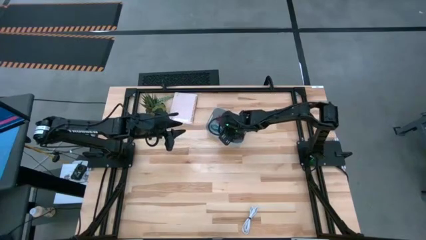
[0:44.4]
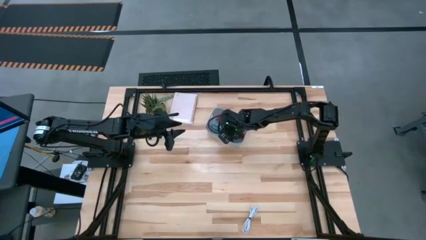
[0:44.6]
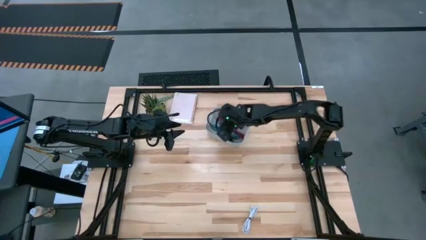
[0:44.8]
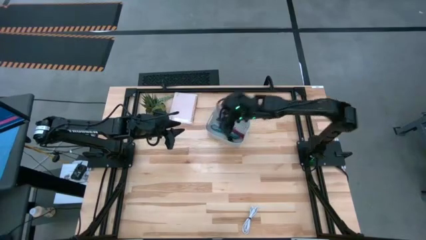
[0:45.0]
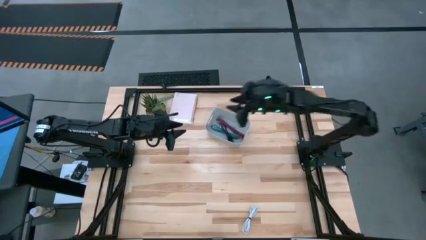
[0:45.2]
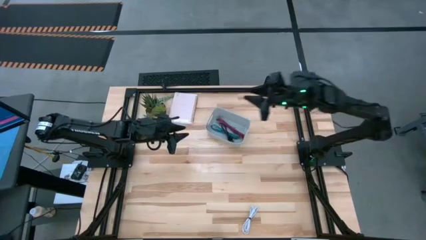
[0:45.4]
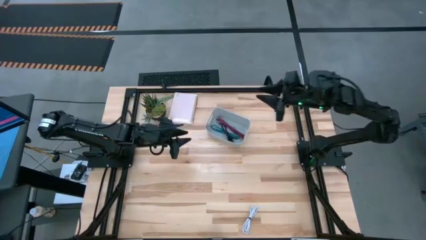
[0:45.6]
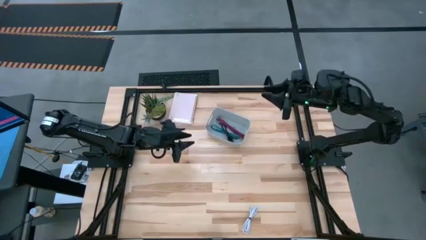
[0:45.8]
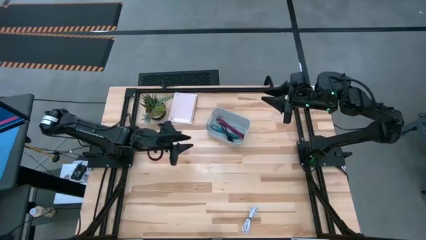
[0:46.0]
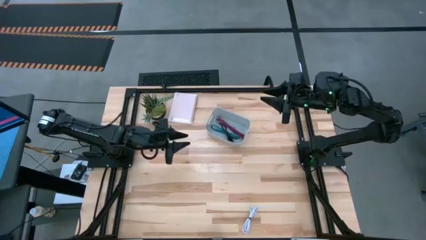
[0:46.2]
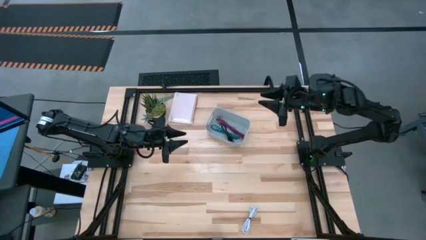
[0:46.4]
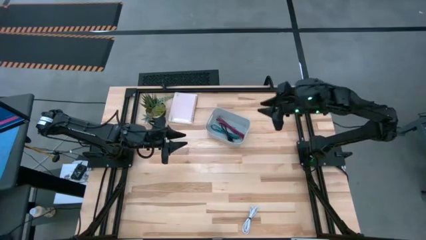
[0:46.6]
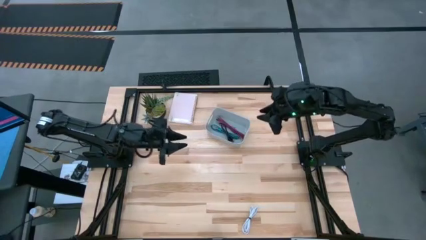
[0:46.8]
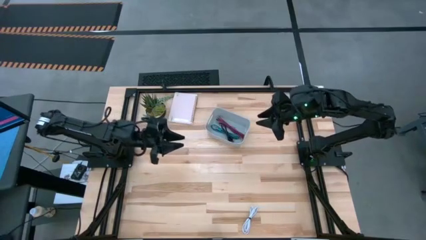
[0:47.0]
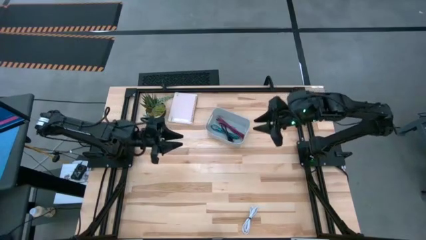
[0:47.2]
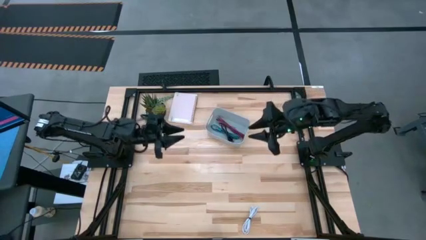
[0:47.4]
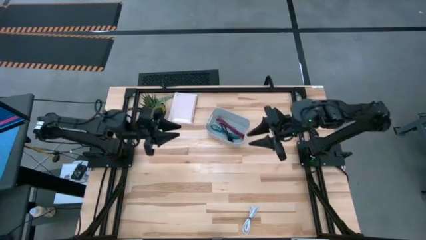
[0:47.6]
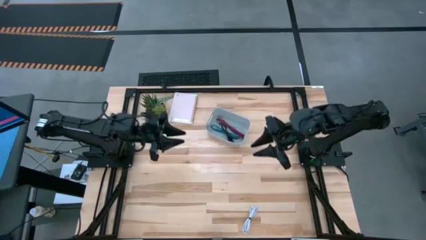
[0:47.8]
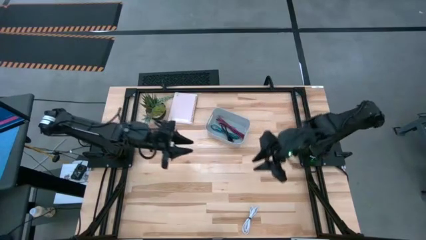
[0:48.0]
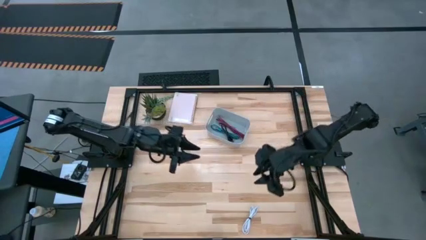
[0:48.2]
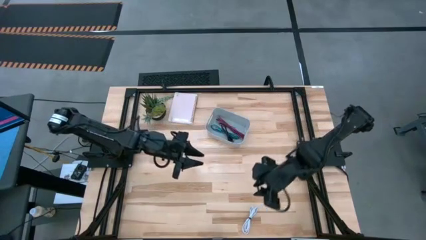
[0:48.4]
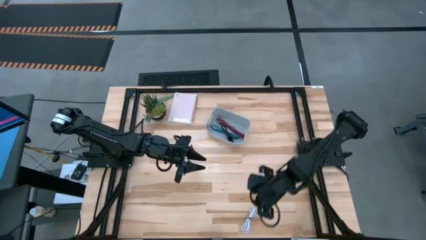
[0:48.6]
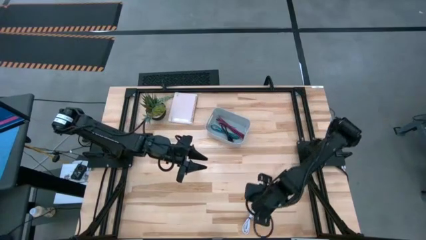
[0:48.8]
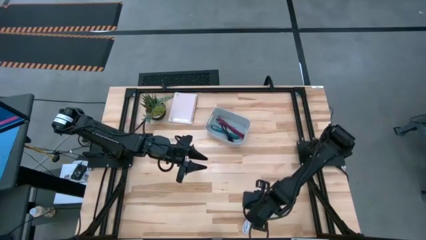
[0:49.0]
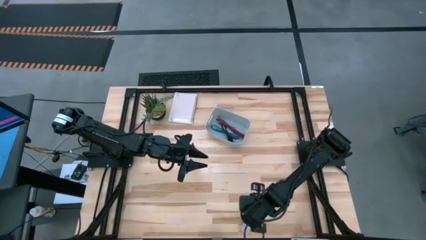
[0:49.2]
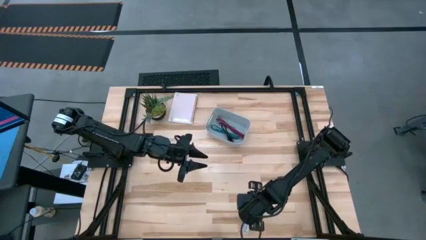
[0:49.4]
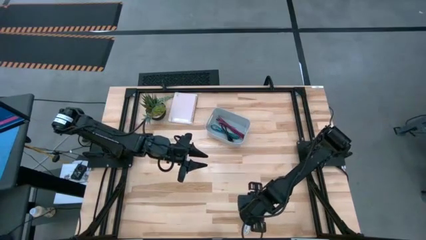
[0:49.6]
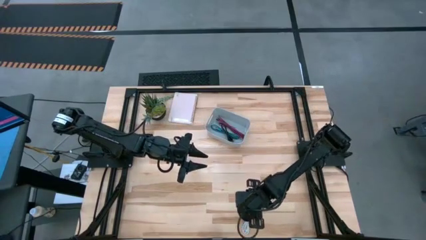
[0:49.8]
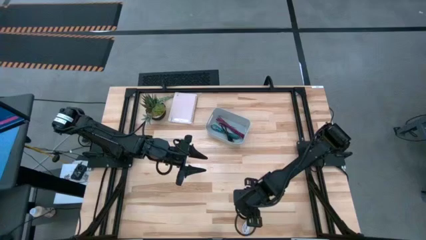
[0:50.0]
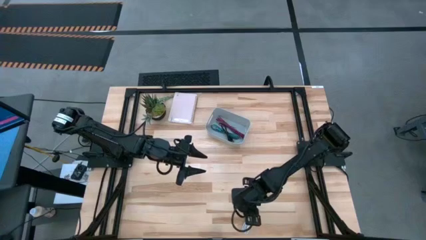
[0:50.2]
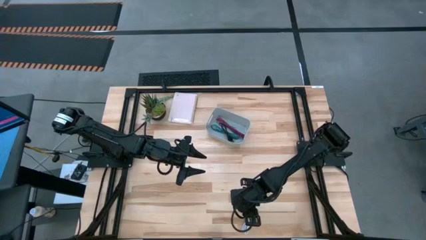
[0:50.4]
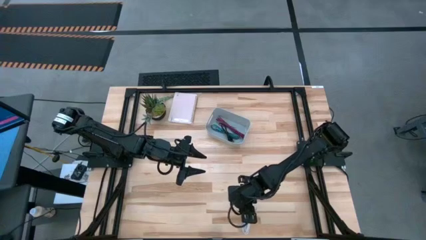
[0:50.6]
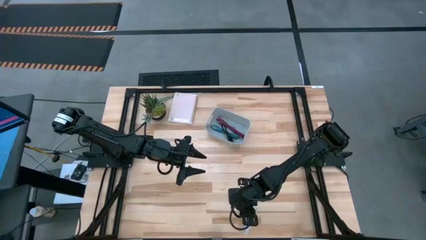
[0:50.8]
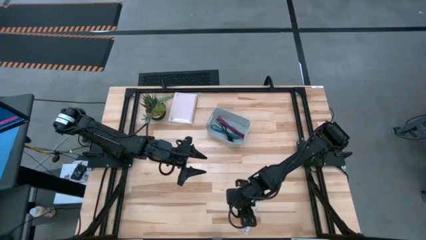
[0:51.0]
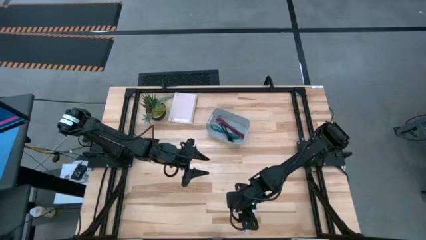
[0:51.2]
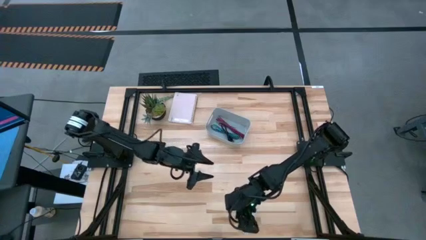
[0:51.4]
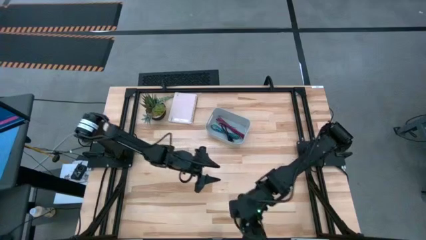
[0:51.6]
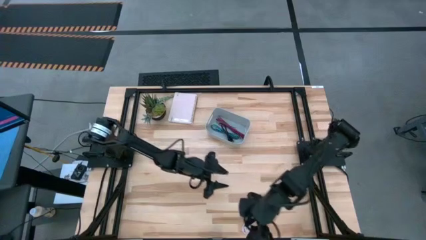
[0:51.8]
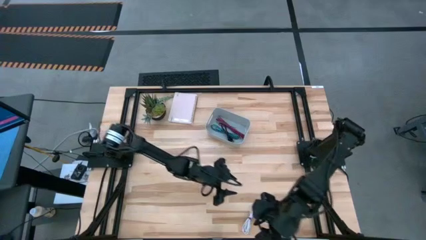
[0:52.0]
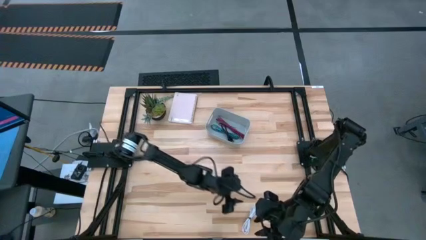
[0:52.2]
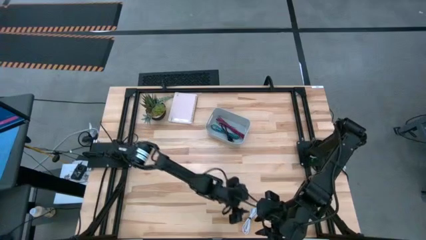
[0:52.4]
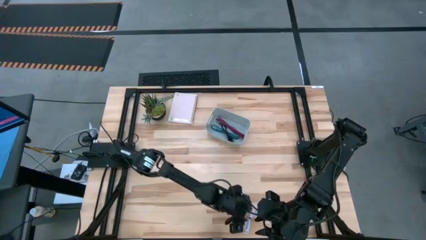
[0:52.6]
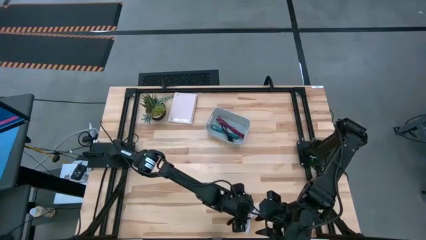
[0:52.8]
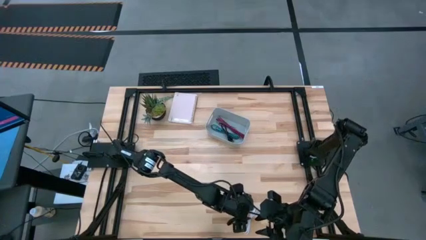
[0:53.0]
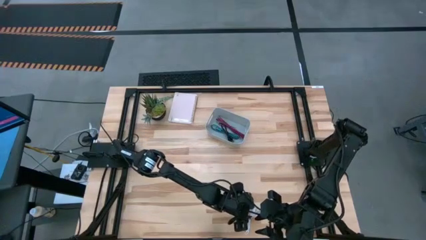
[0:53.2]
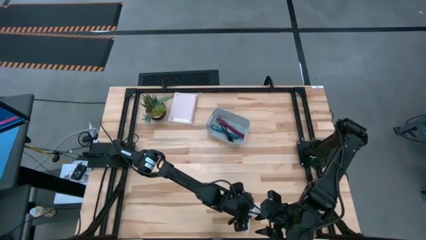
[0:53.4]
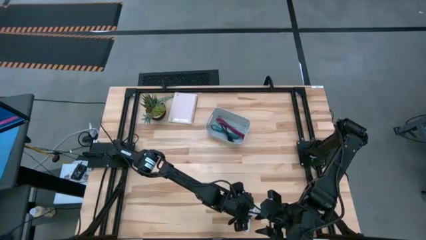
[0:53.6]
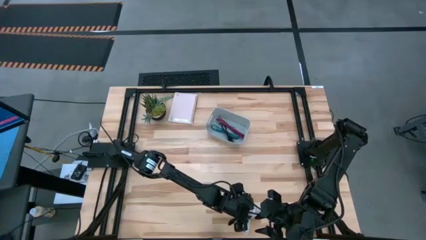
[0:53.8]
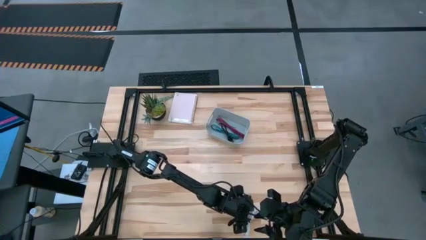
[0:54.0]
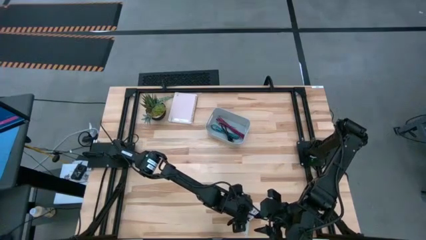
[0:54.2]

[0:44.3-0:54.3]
Task: Pick and place USB-C Cables
Put the white charger cable into the gray bin
